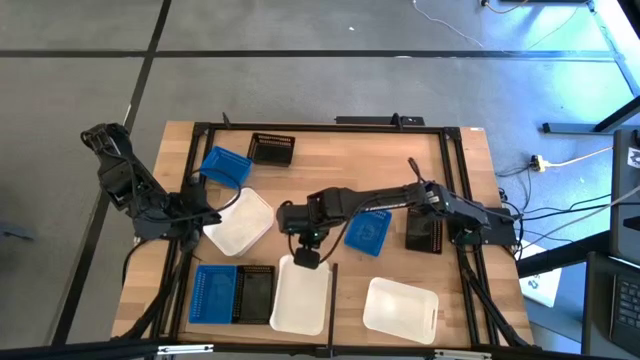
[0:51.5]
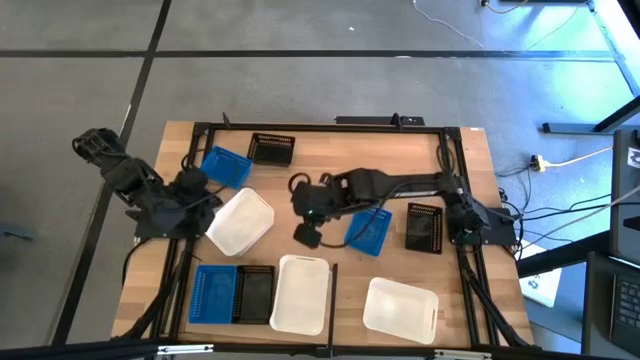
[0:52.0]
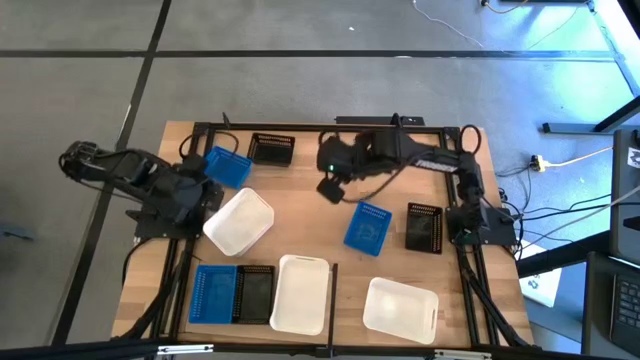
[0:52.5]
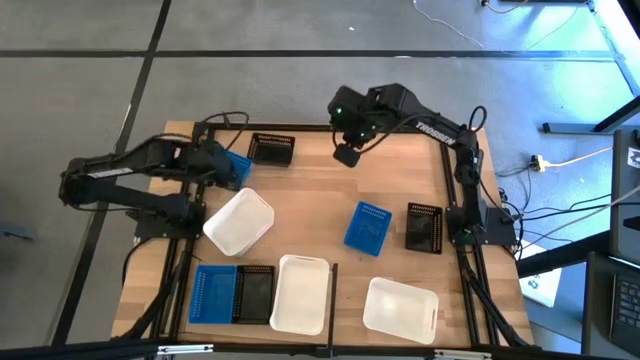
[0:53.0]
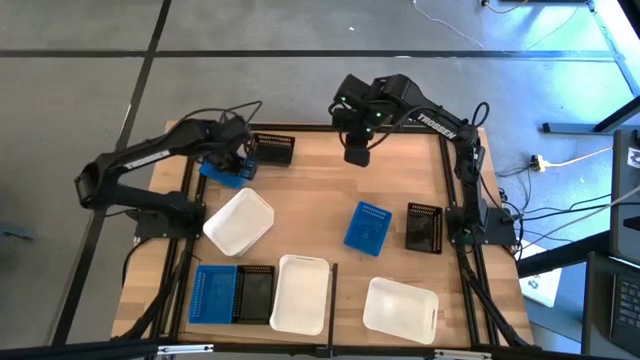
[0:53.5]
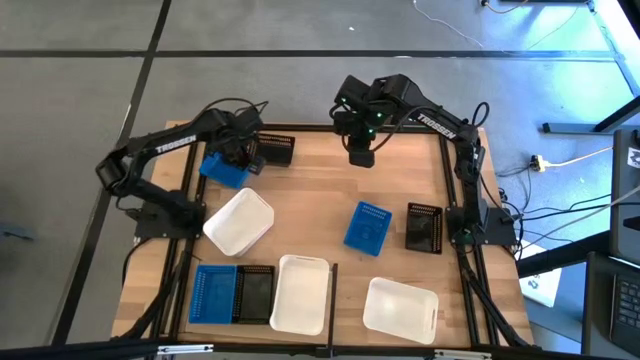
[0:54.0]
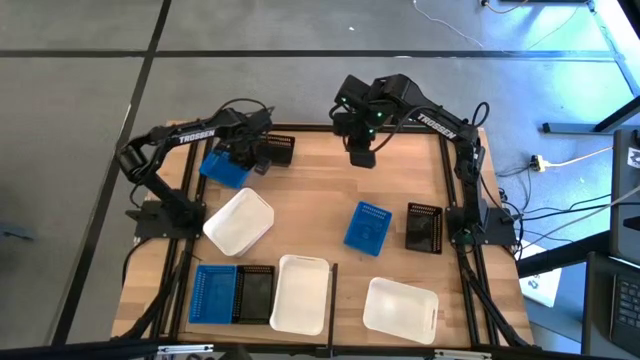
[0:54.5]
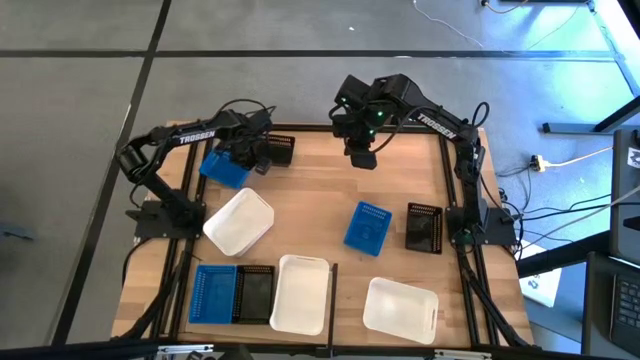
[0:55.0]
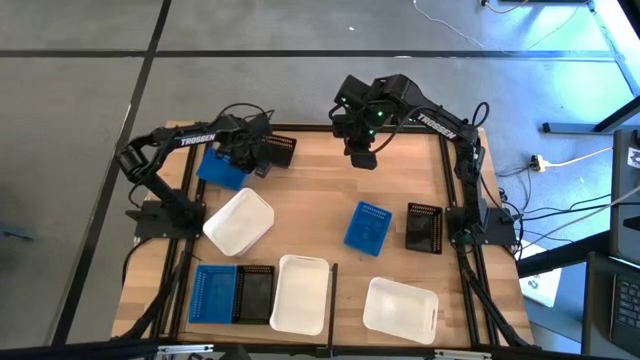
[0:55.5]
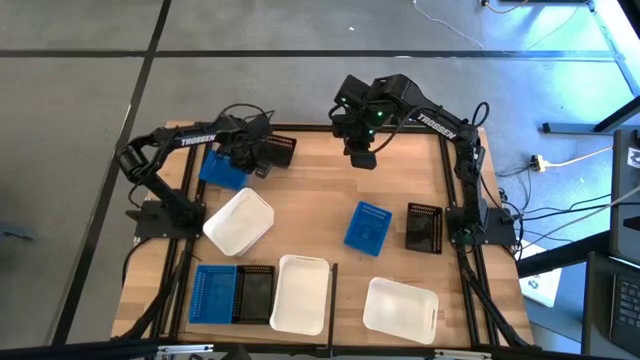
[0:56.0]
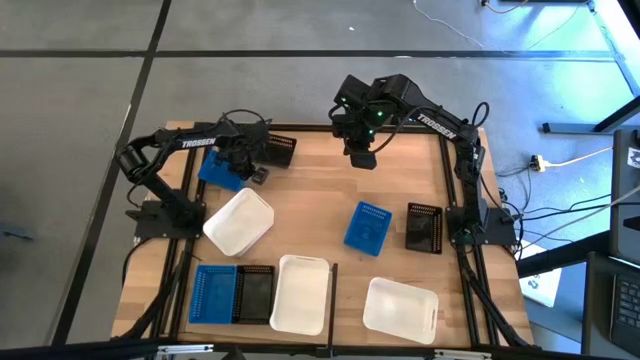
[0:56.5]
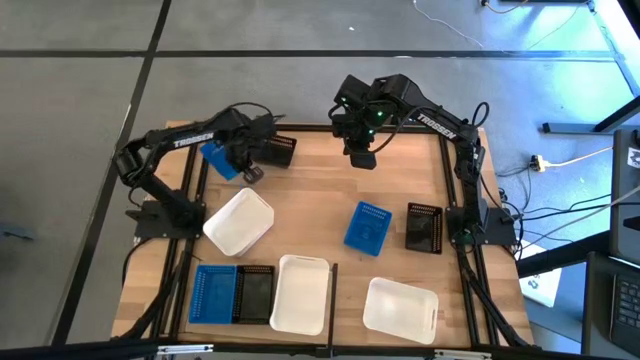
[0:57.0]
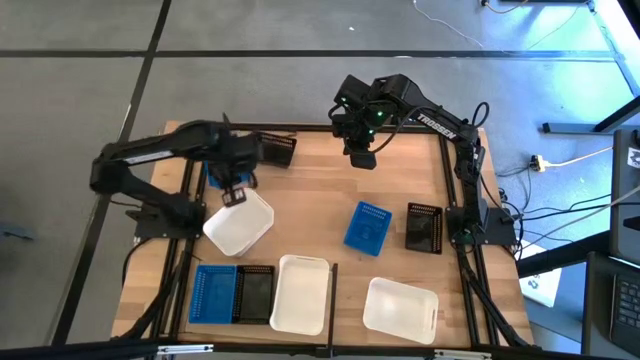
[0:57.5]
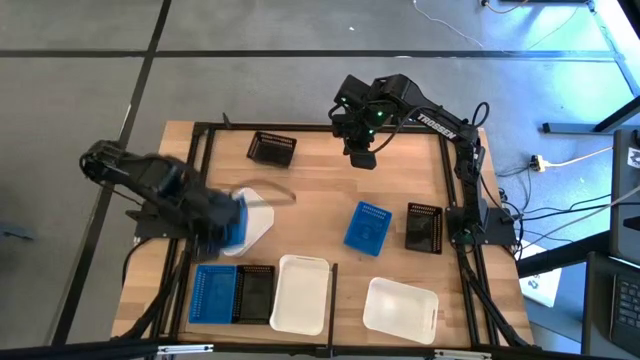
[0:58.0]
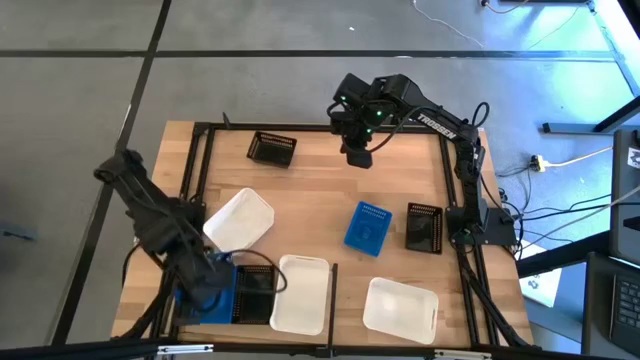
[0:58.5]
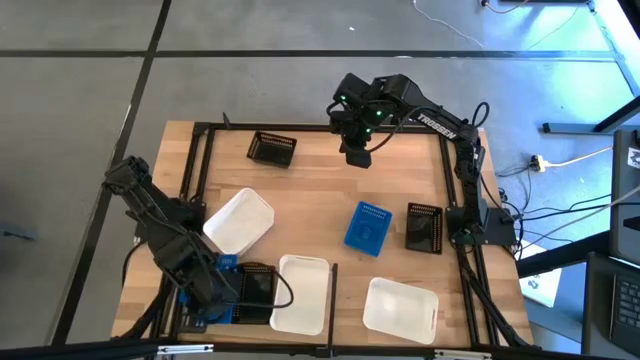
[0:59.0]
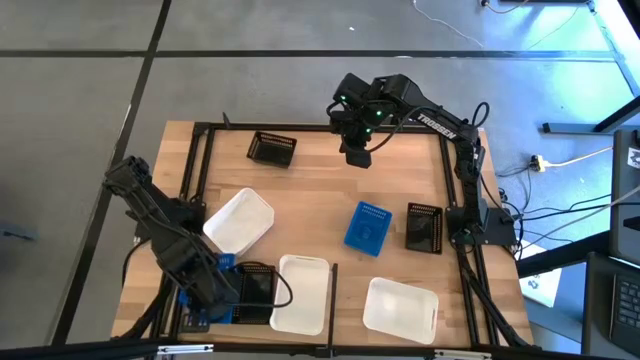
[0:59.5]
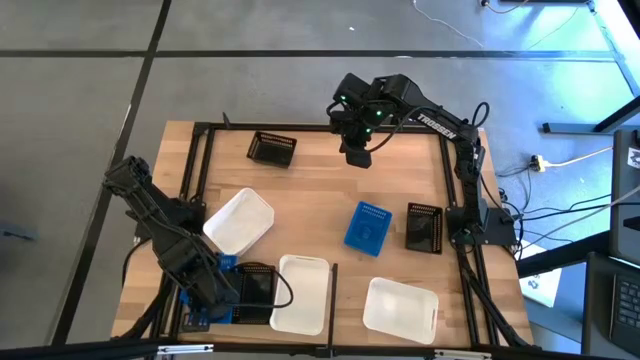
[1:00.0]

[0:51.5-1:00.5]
Task: Stack baskets on shelf by color
Stack the left blue bin on top of the blue bin on the shelf

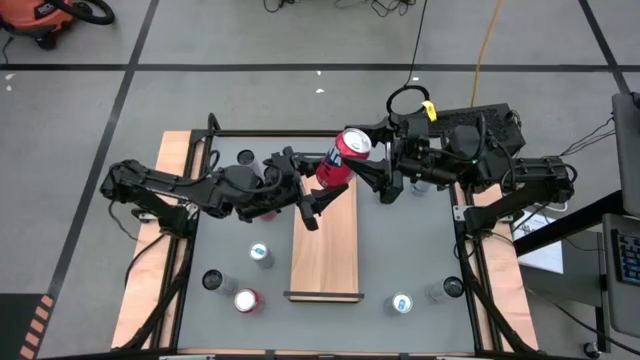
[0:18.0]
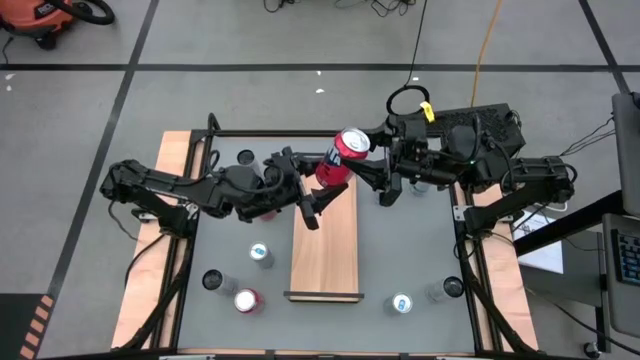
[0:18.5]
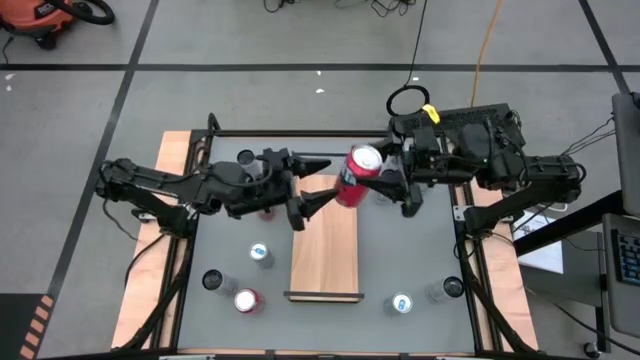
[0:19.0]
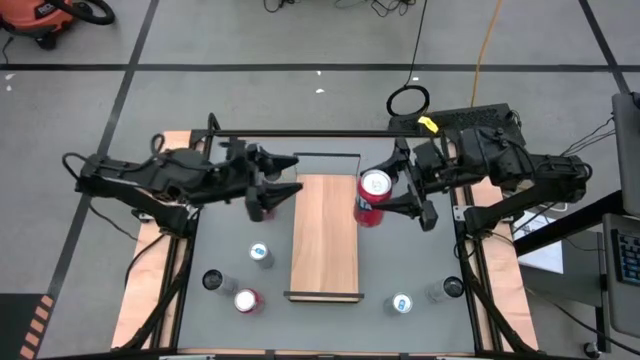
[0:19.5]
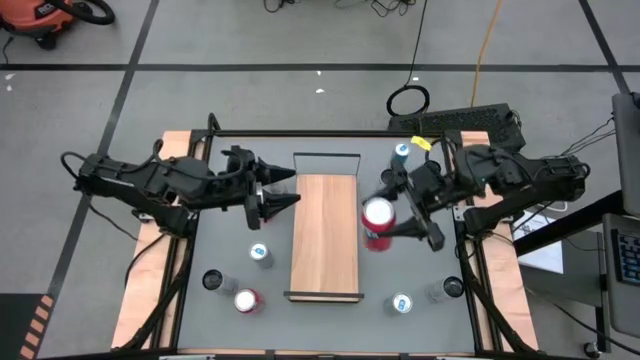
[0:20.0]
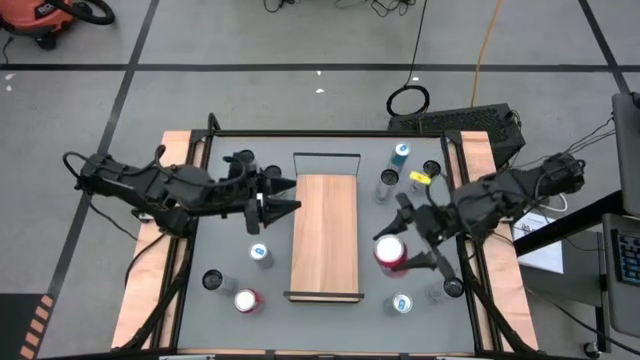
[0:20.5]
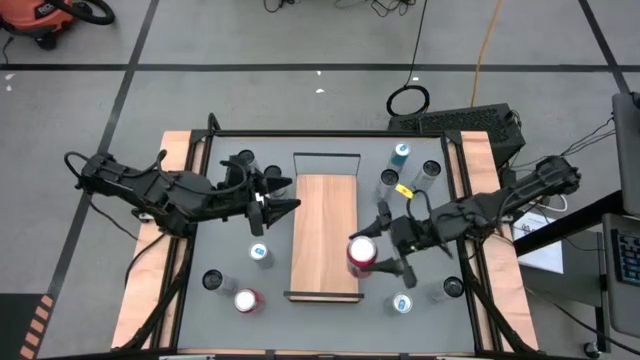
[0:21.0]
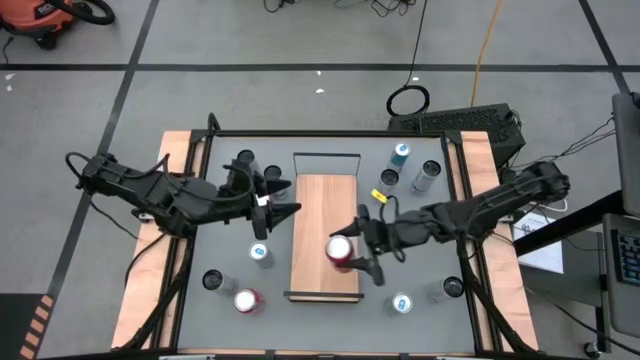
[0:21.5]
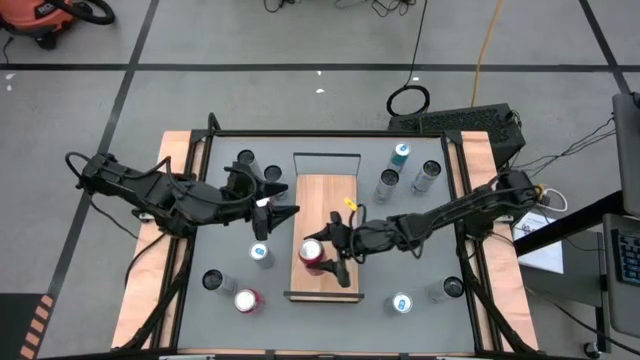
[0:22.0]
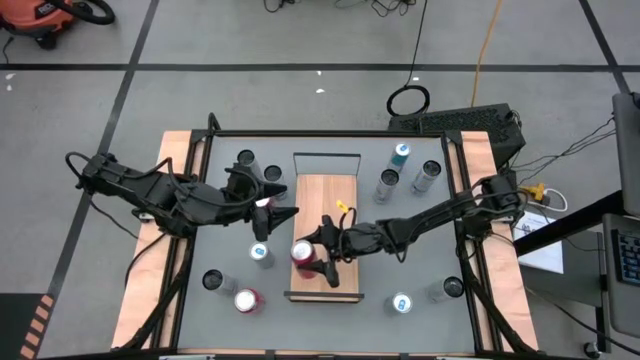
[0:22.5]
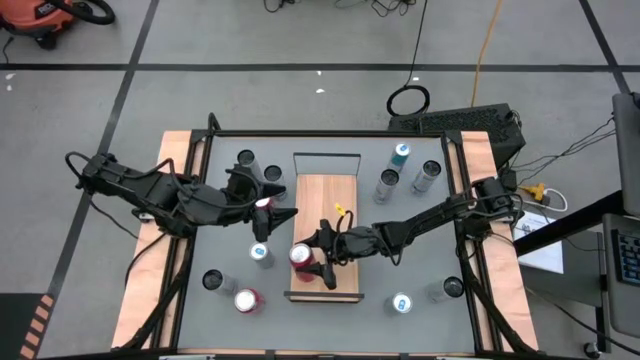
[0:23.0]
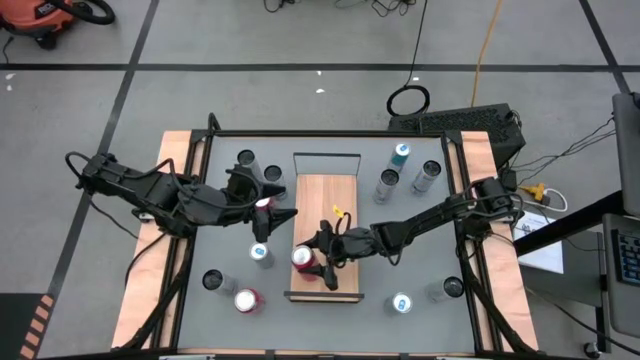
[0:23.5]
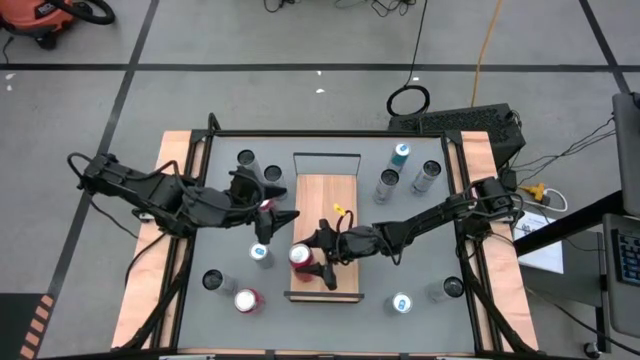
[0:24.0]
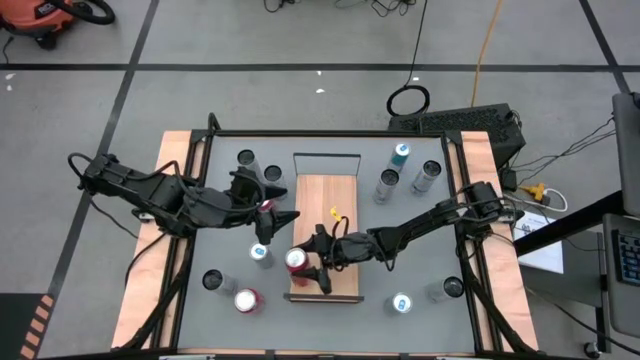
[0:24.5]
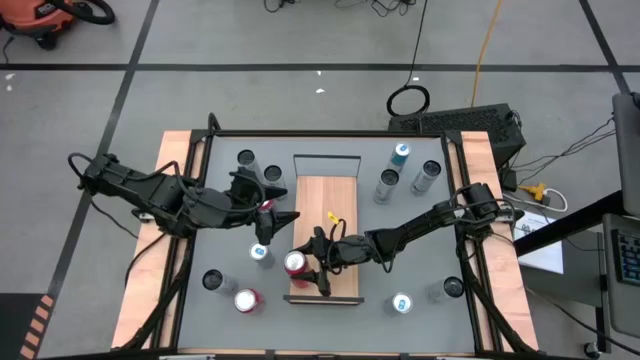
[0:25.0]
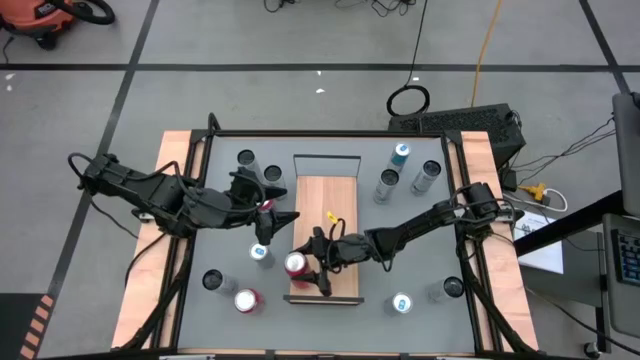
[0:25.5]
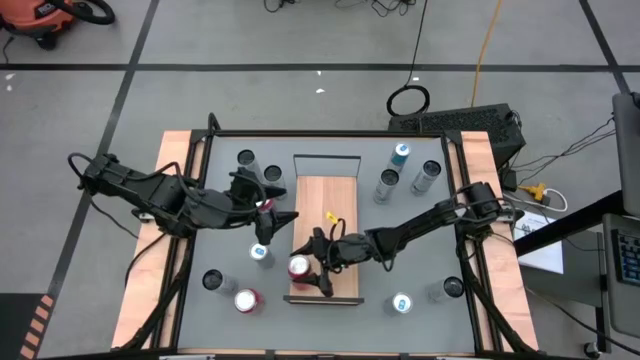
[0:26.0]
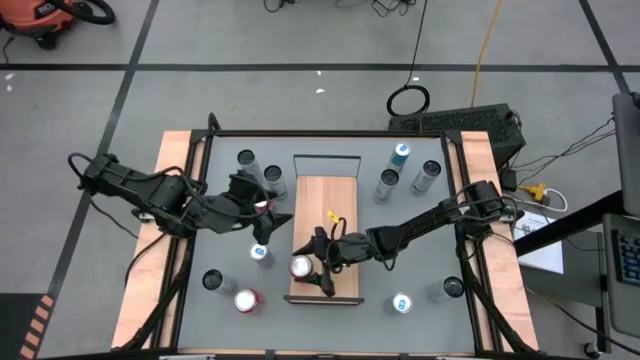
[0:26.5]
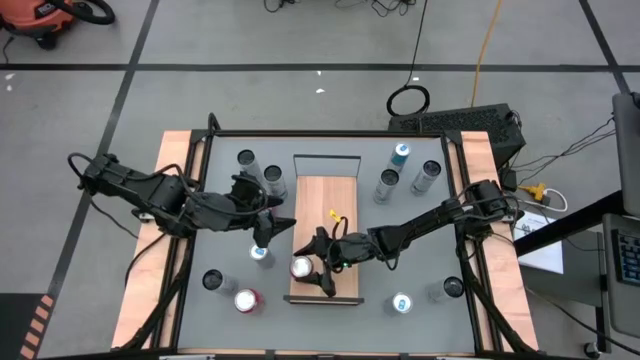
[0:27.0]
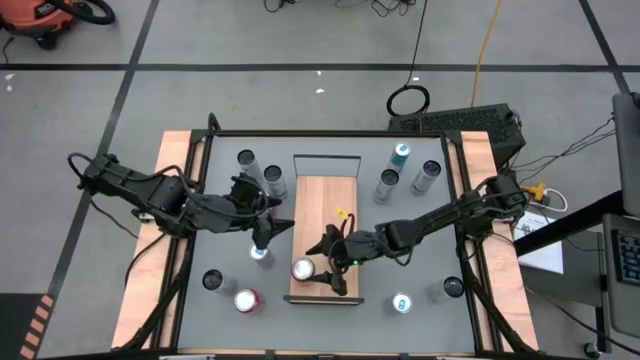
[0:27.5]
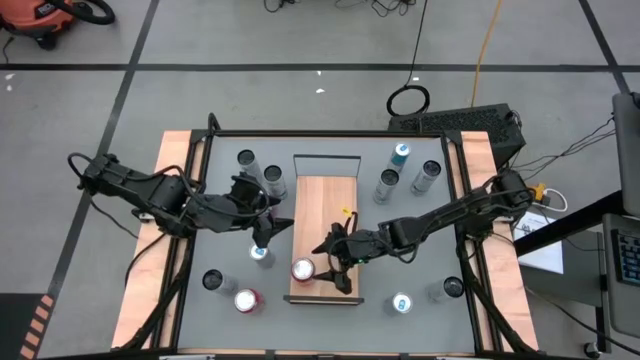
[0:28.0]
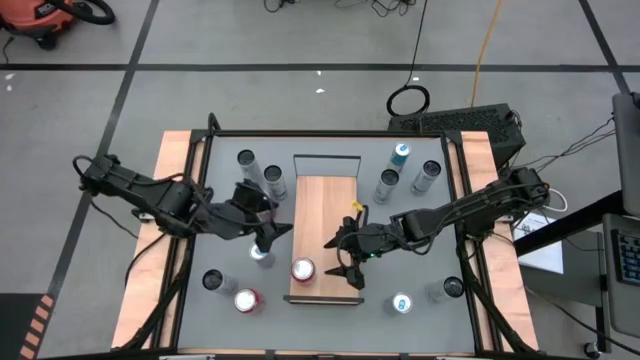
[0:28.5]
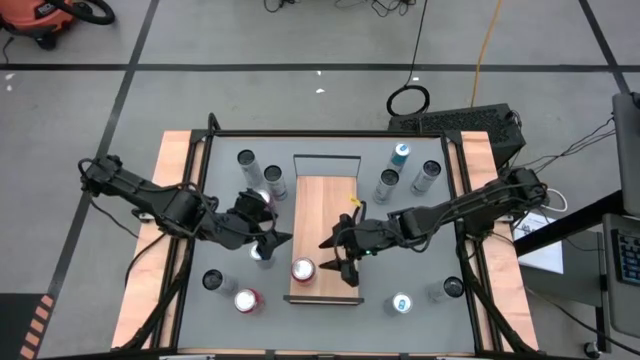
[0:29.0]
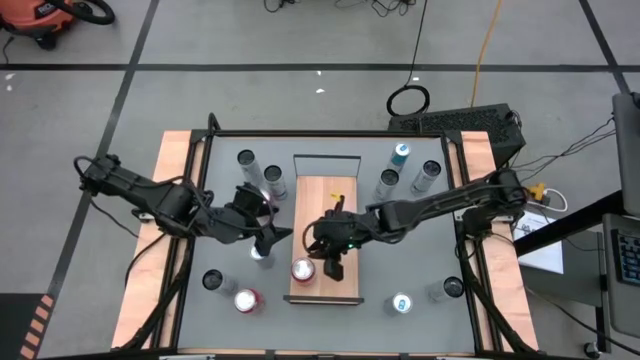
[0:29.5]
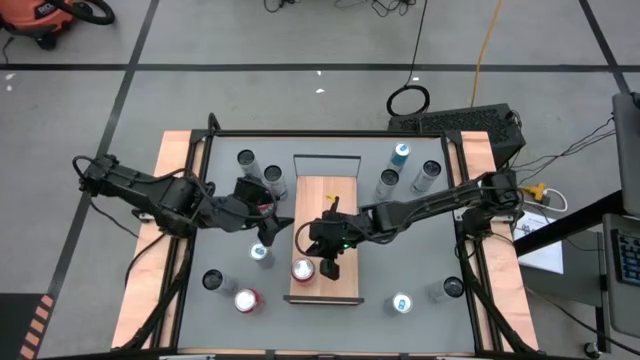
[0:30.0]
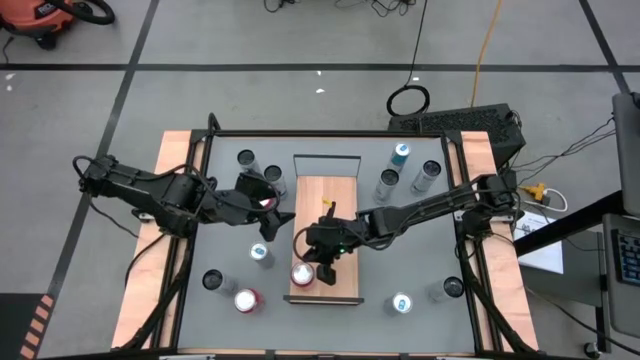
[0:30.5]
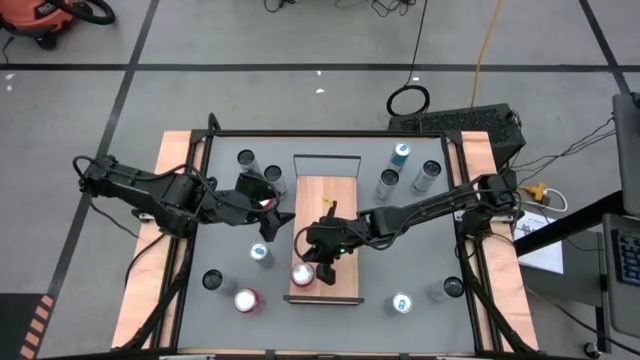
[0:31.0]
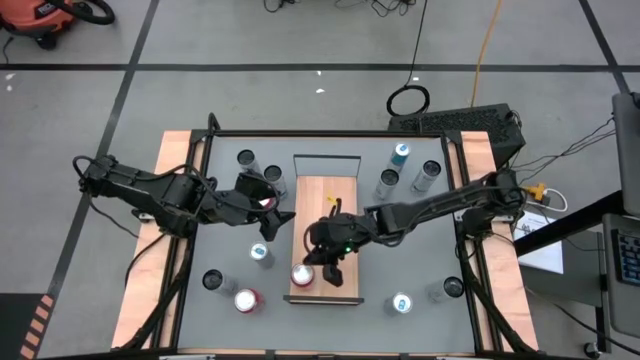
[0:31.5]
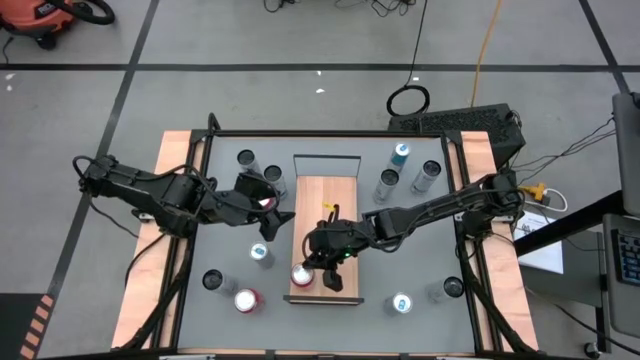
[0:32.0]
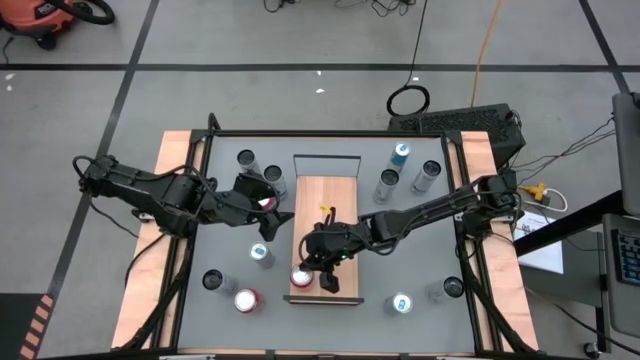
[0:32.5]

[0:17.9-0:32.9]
Task: Sort soda cans
Put the right red soda can on the shelf
